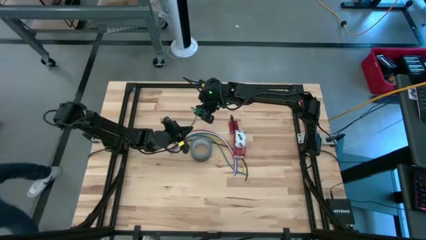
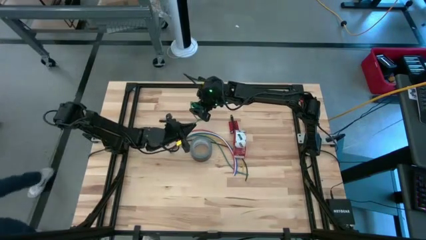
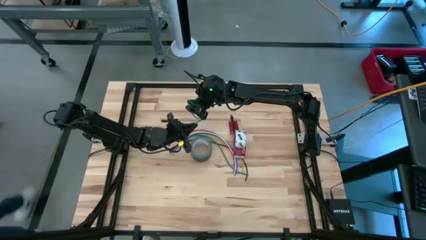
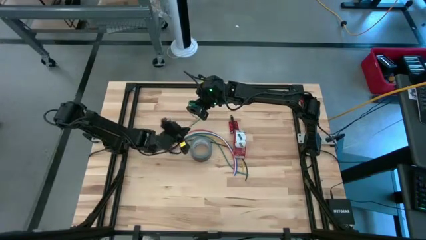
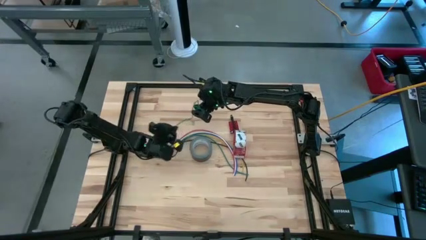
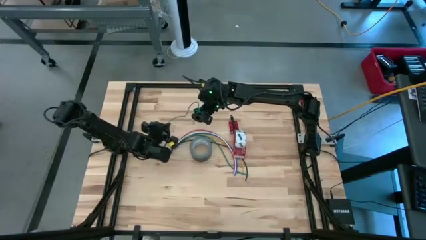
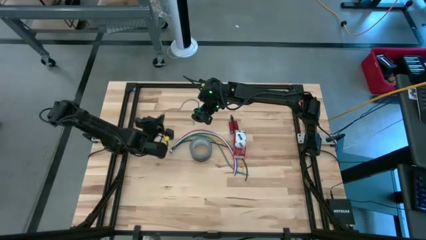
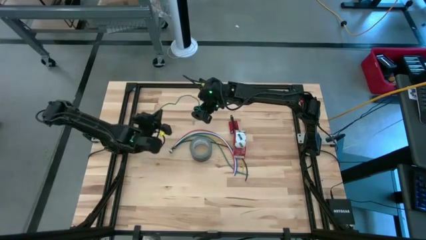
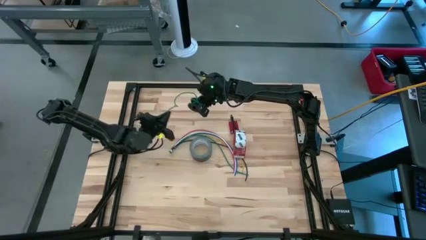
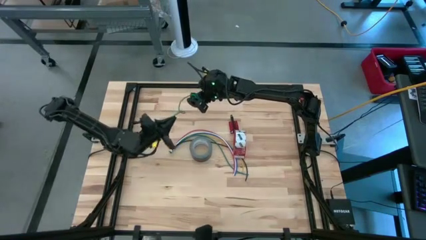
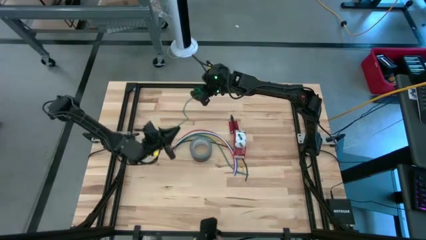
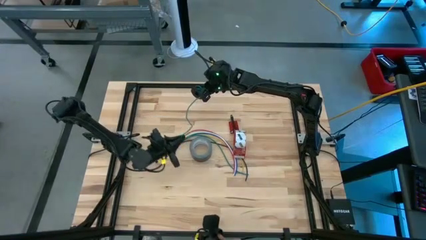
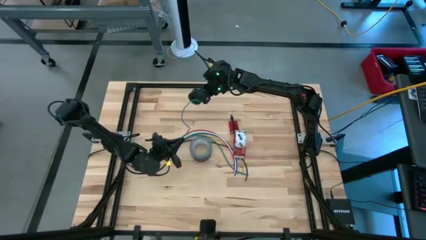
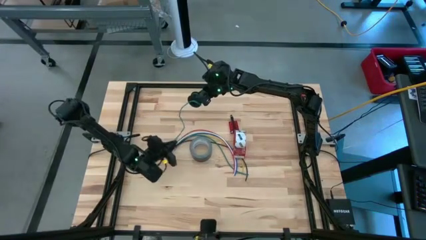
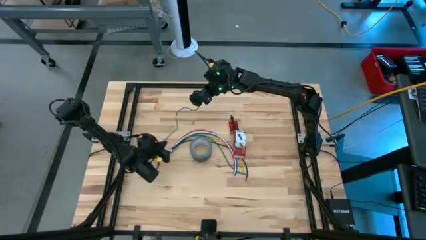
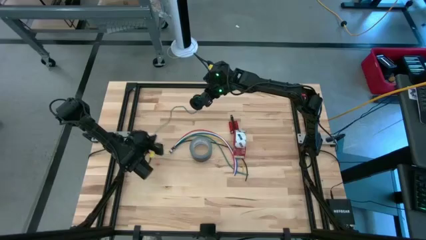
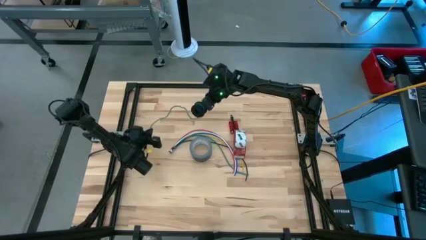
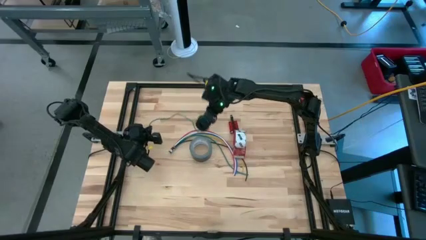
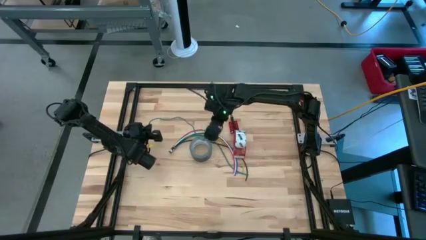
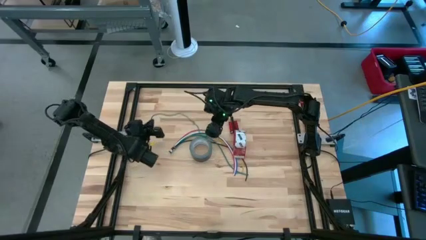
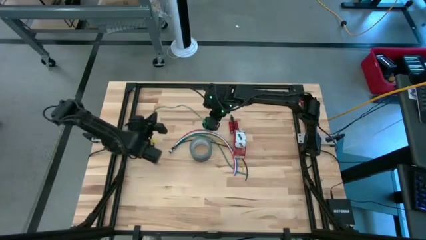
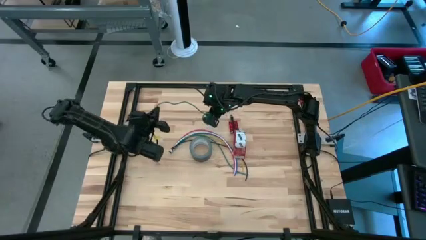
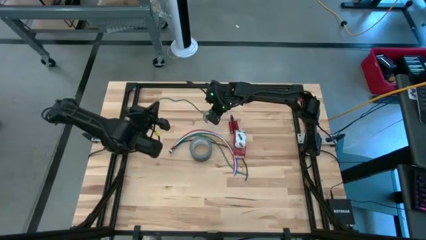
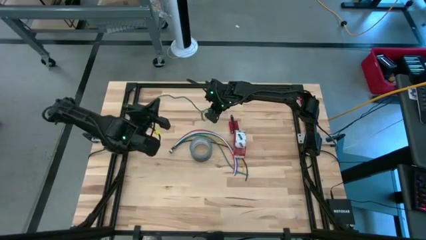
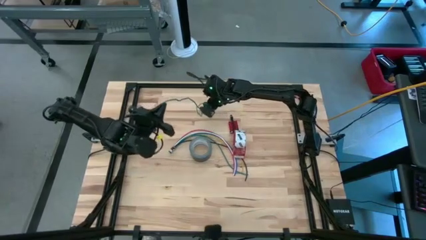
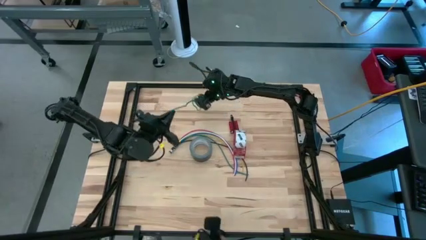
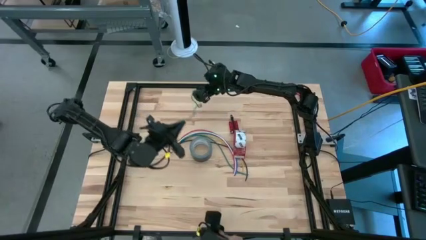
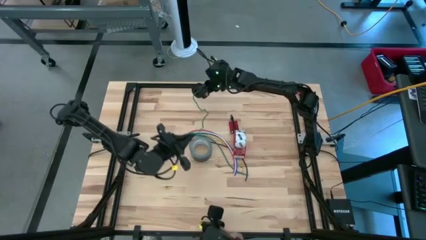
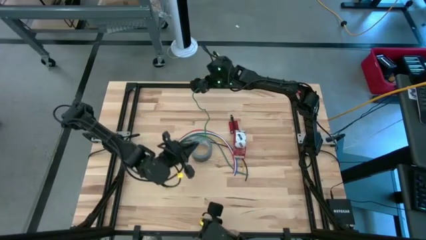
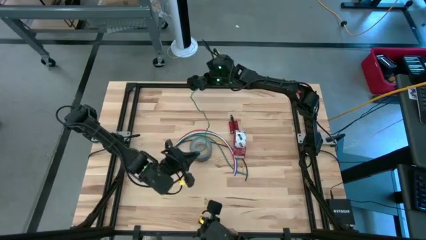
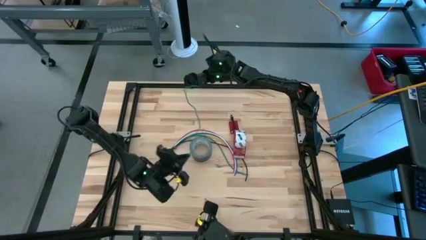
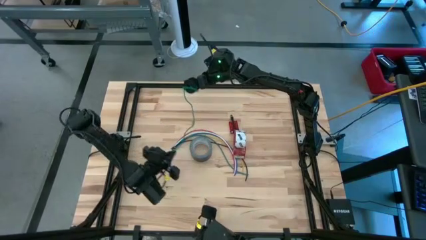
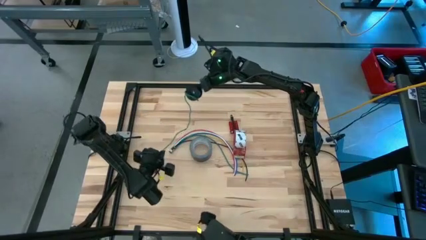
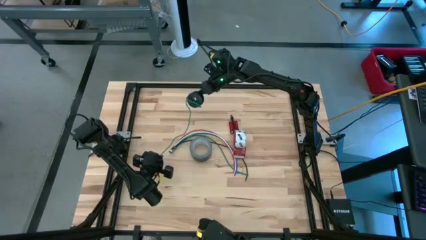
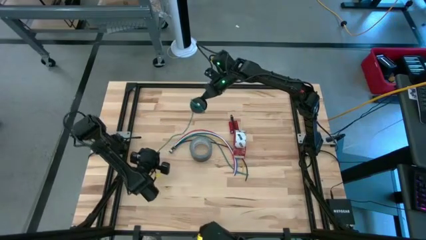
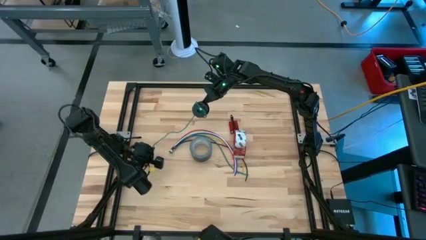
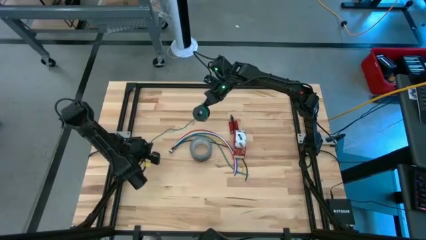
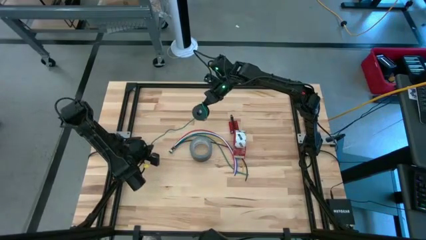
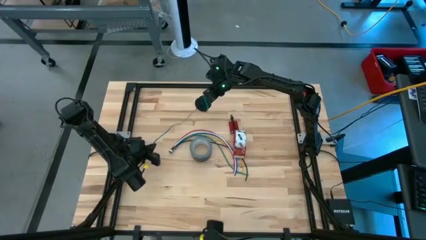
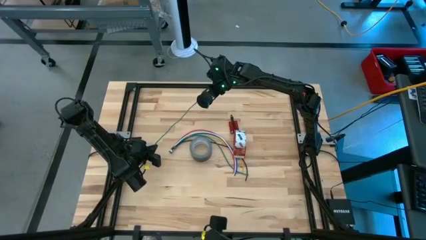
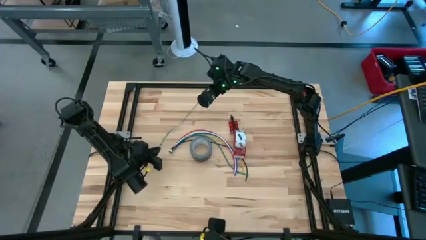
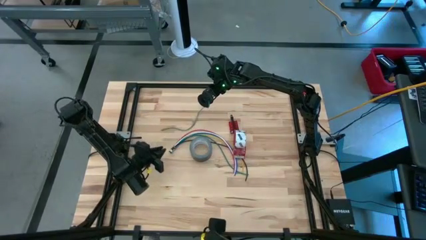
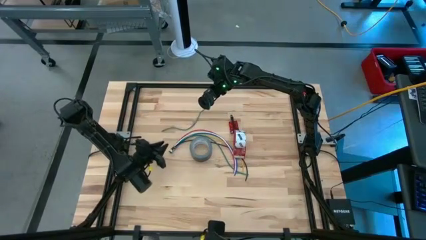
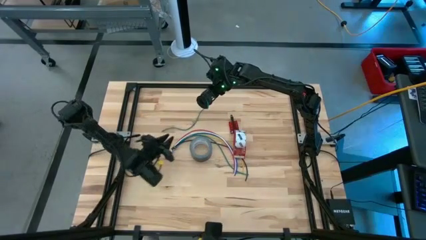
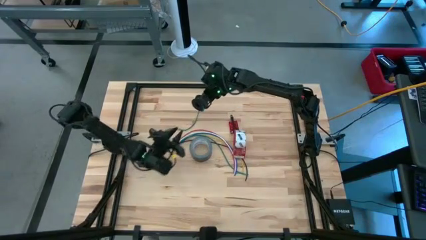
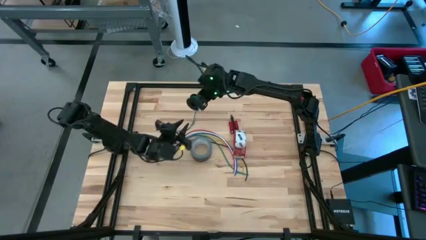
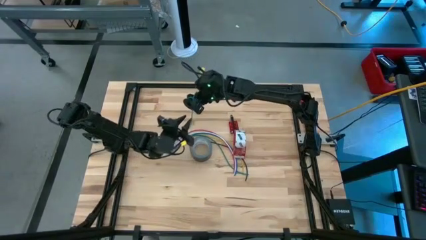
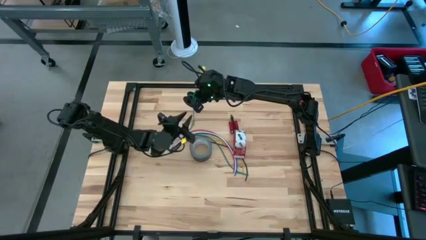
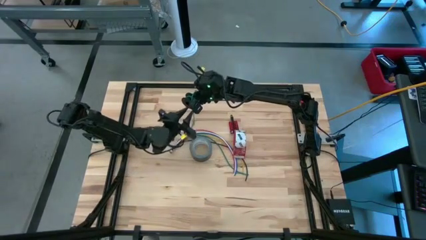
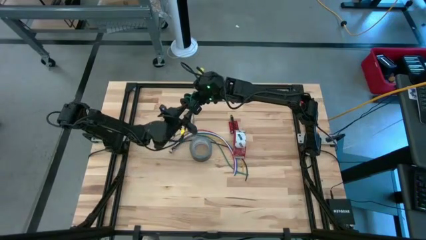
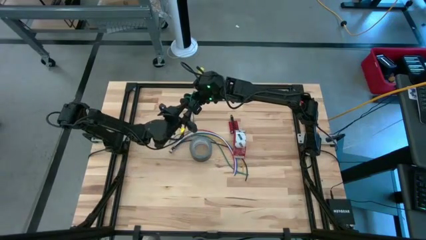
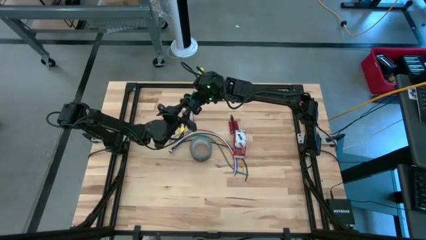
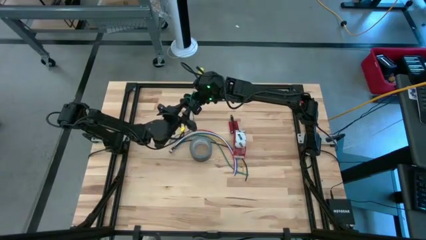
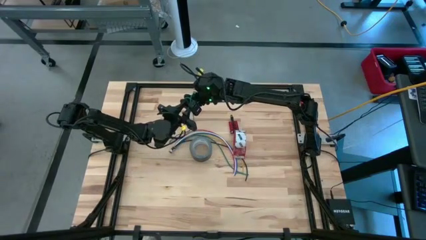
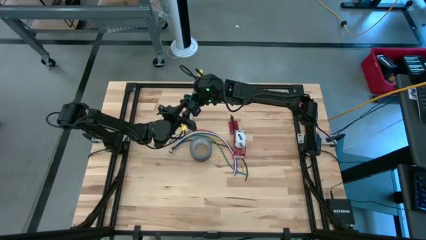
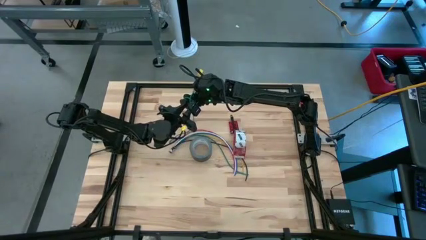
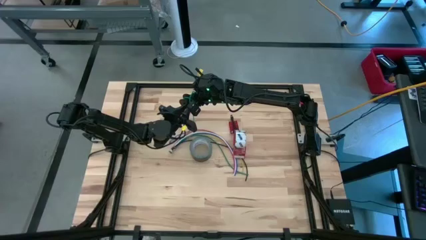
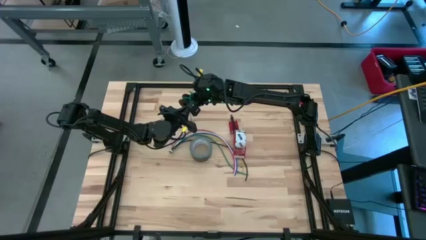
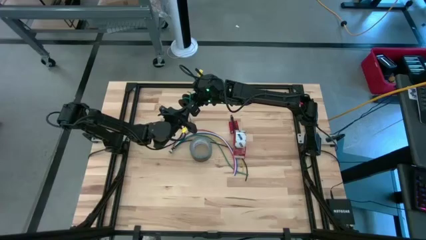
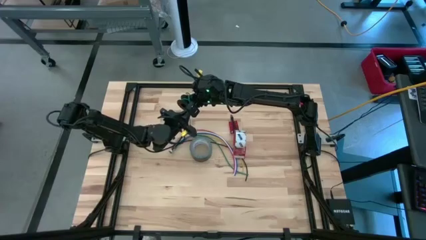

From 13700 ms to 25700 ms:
Task: Coil cords
Uncoil the green wire from the black spool
